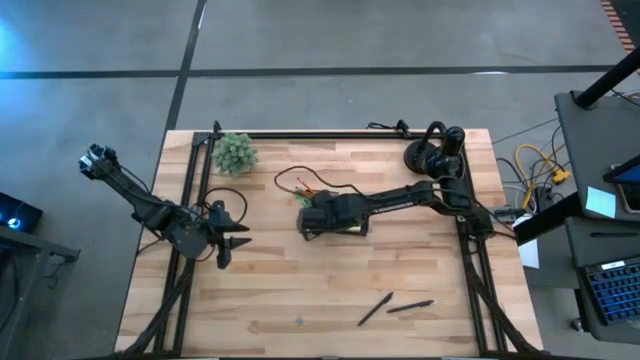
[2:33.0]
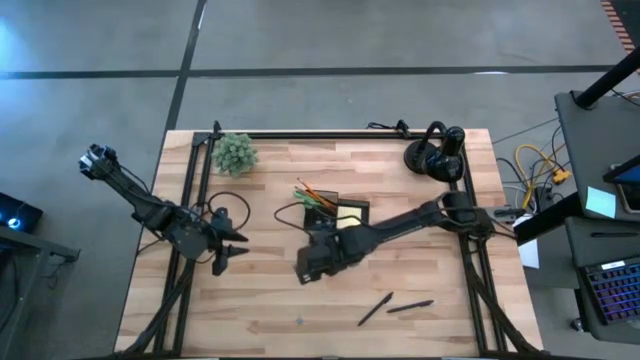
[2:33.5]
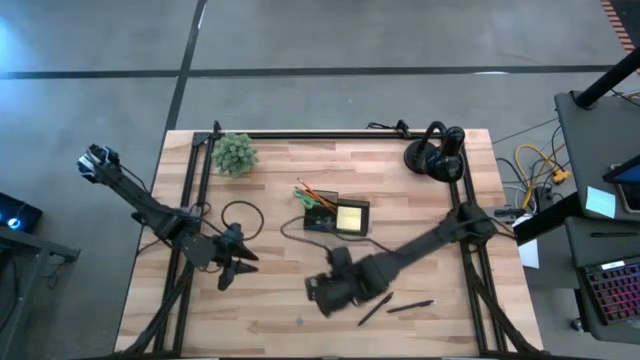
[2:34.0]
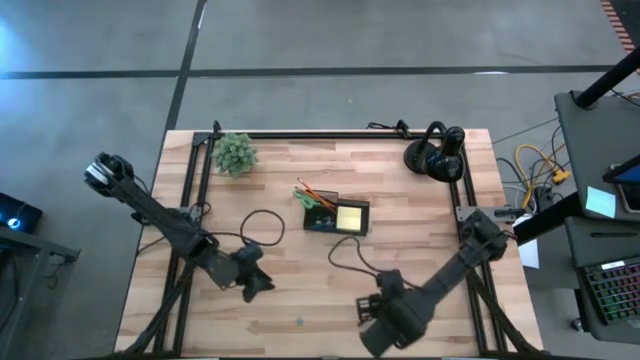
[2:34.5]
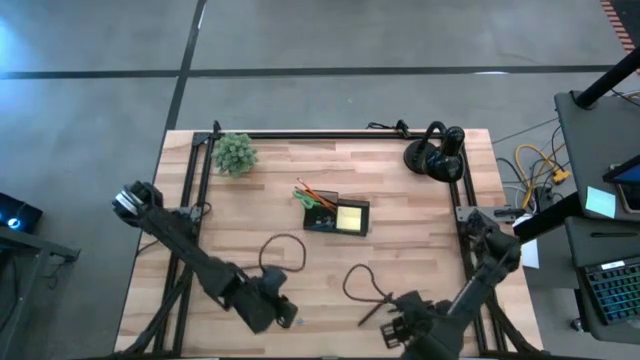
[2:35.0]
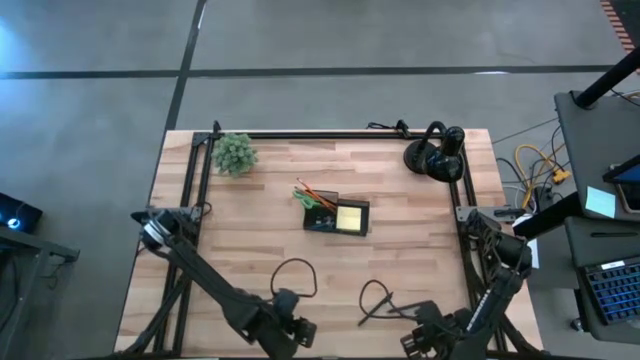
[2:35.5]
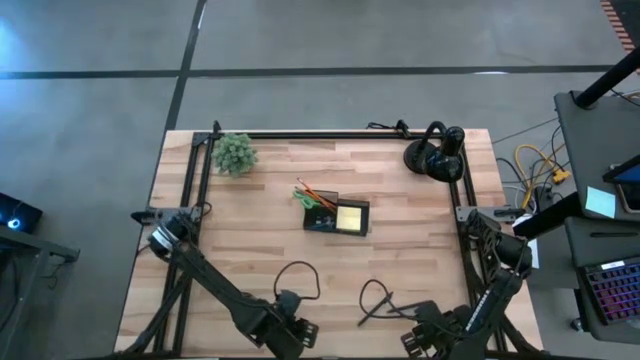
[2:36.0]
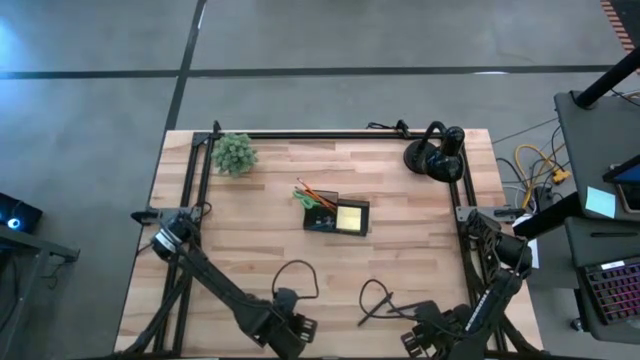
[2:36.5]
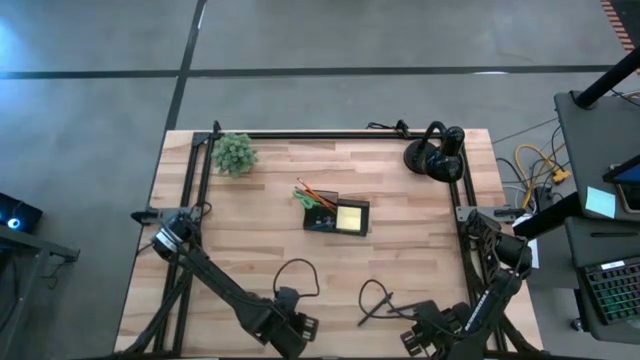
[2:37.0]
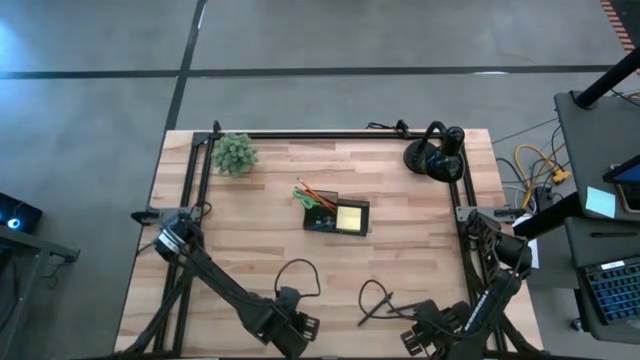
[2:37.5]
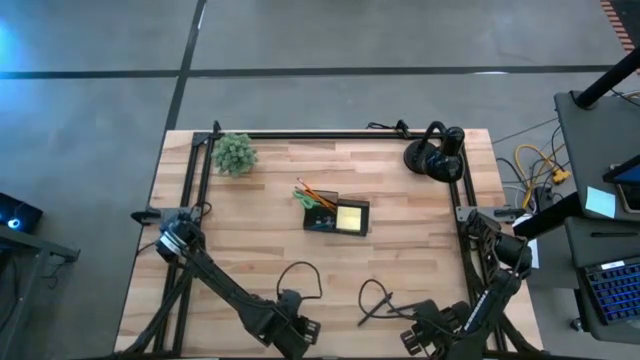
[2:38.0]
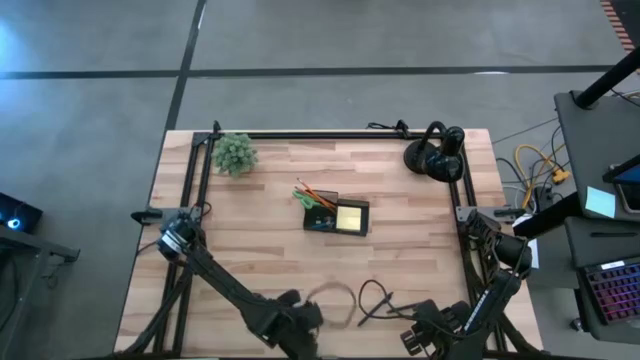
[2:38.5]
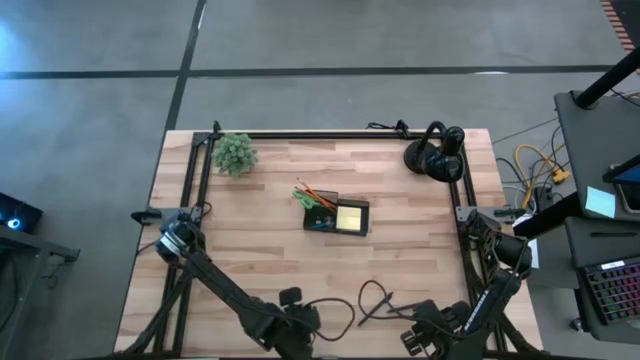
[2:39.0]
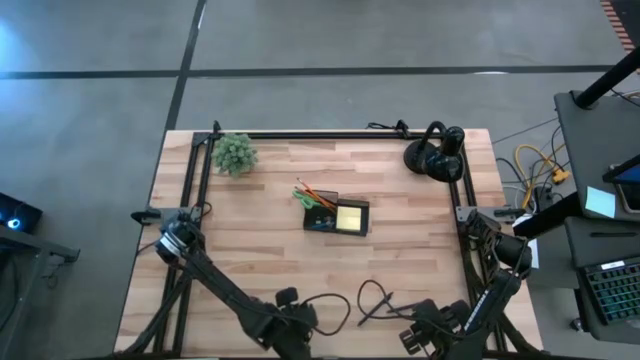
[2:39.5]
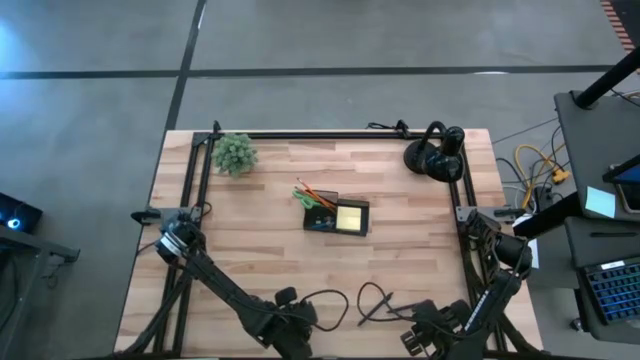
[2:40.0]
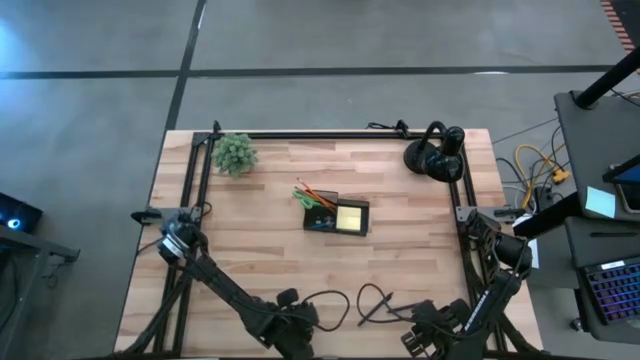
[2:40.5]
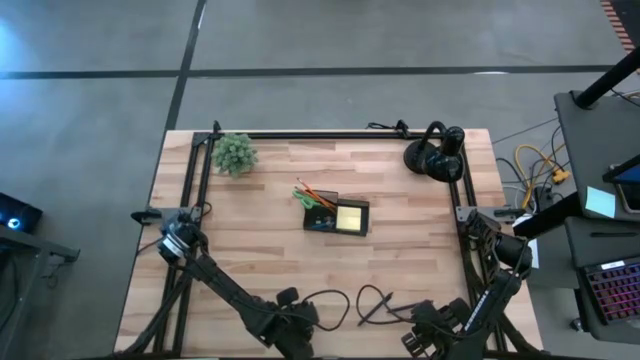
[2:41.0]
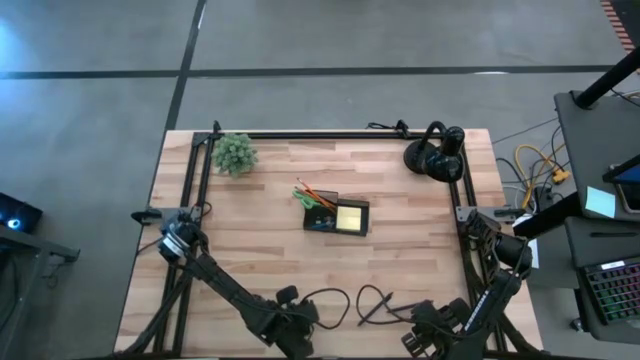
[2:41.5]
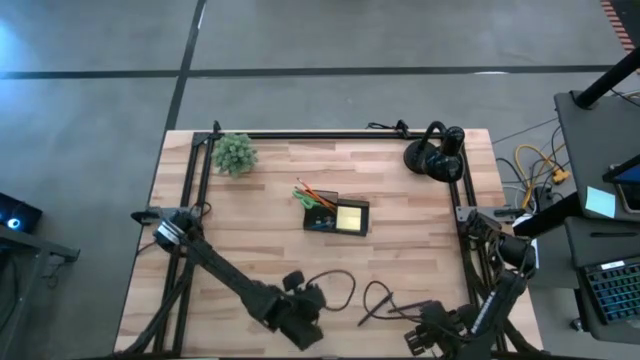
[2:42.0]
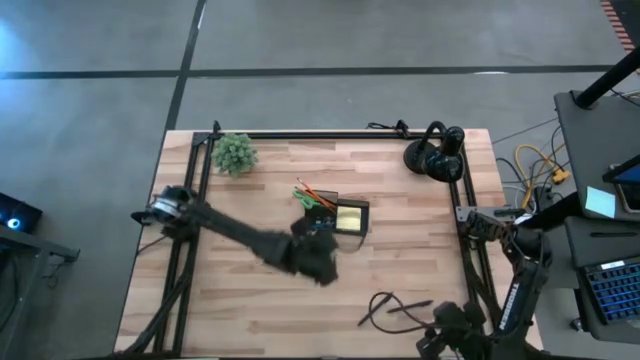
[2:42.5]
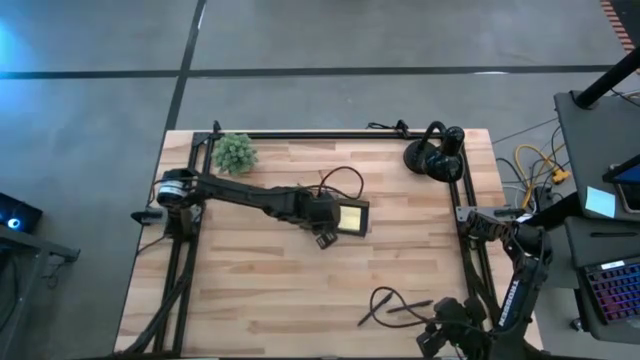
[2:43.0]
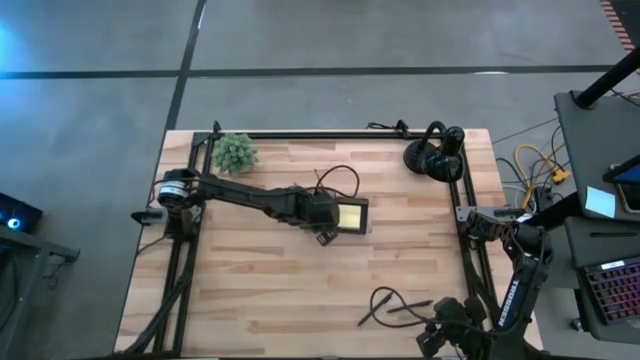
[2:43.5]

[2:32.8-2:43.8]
Task: Pick and place office supplies into organizer
Put the blue binder clip into the black desk organizer

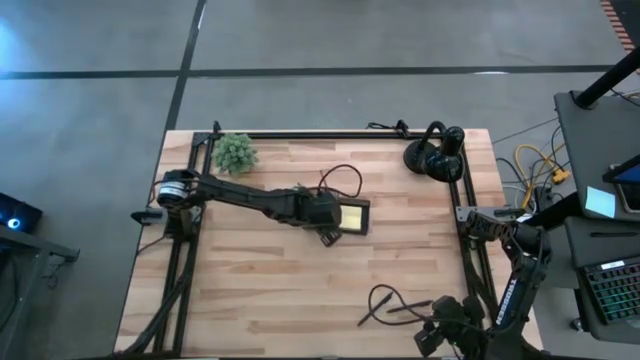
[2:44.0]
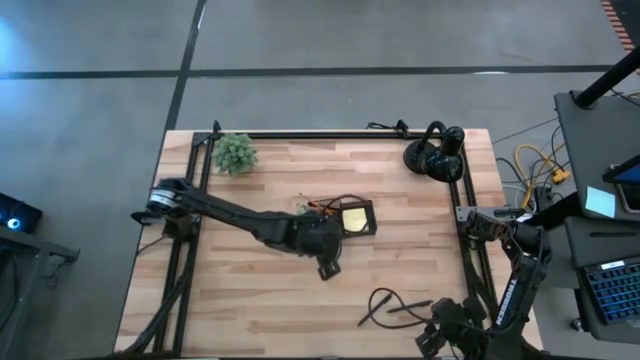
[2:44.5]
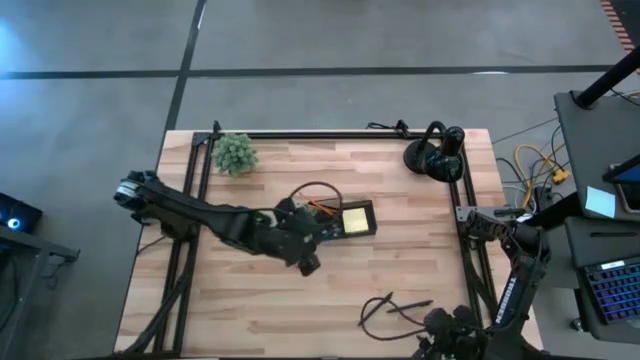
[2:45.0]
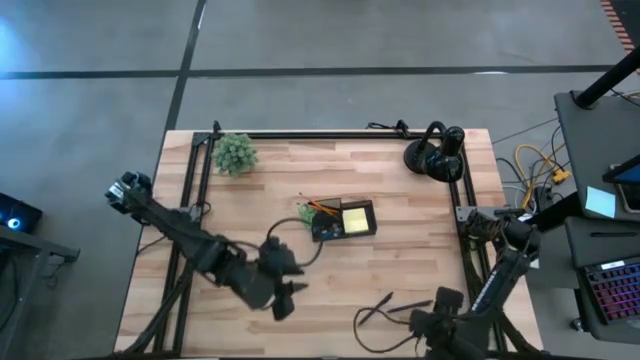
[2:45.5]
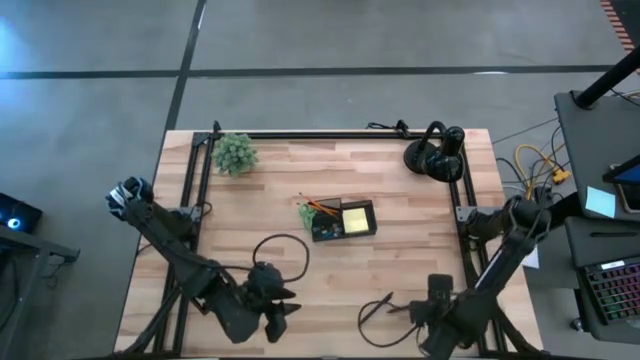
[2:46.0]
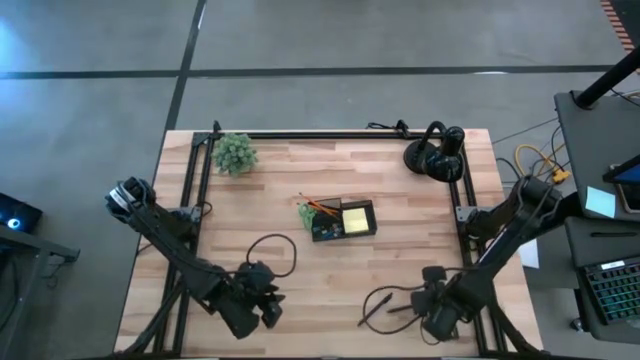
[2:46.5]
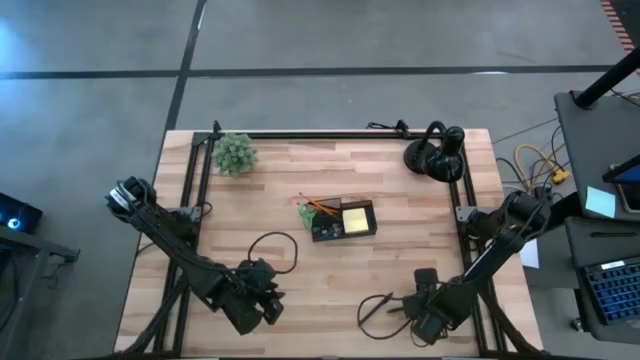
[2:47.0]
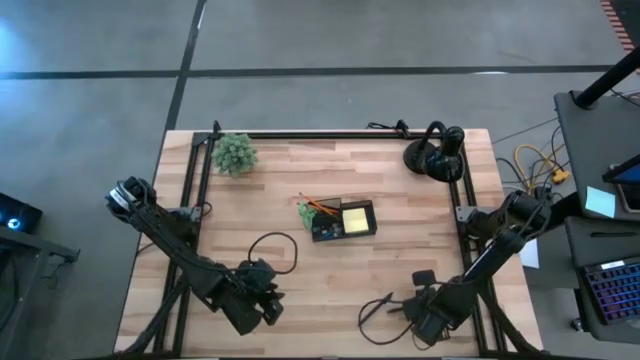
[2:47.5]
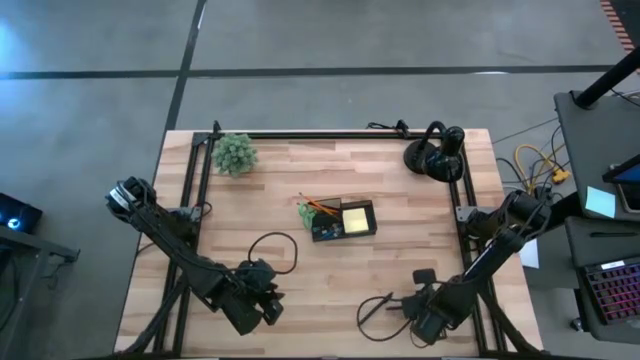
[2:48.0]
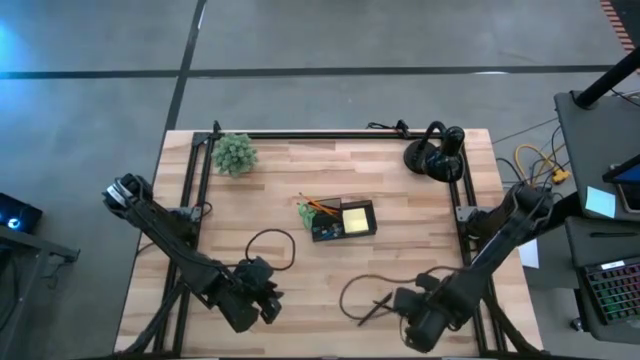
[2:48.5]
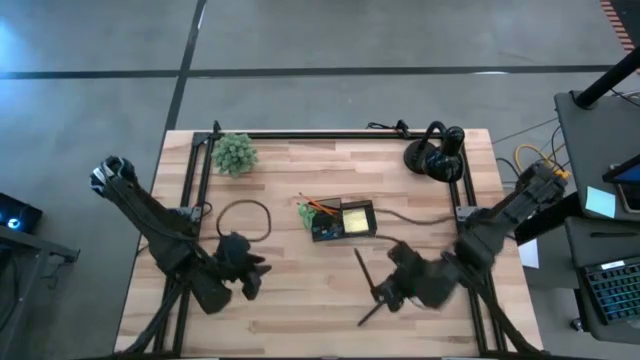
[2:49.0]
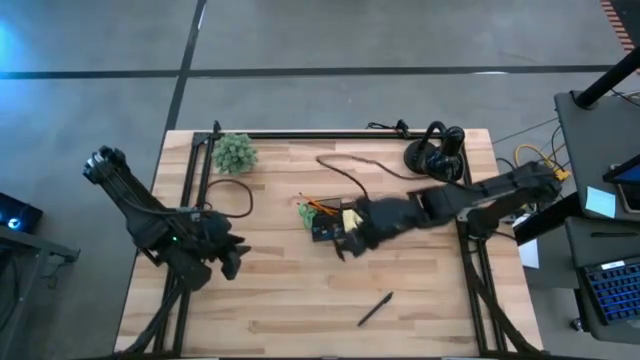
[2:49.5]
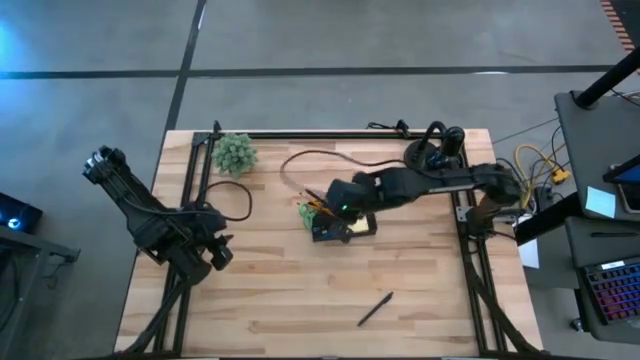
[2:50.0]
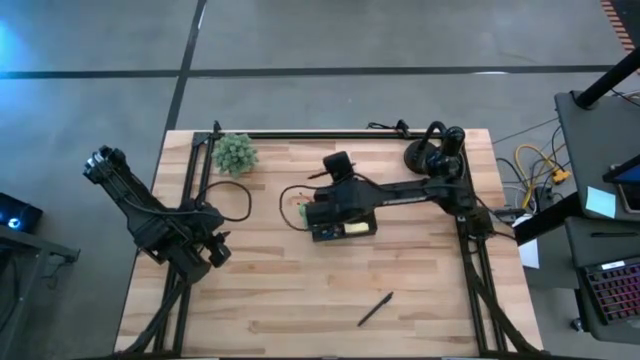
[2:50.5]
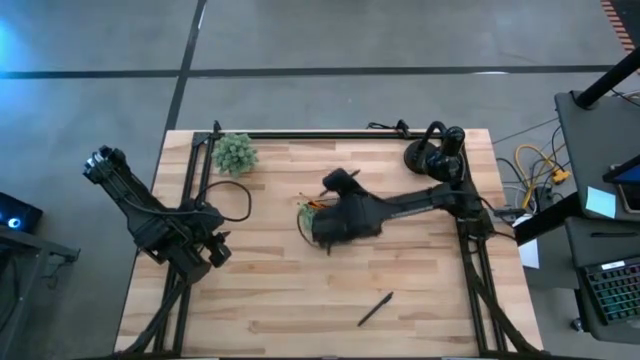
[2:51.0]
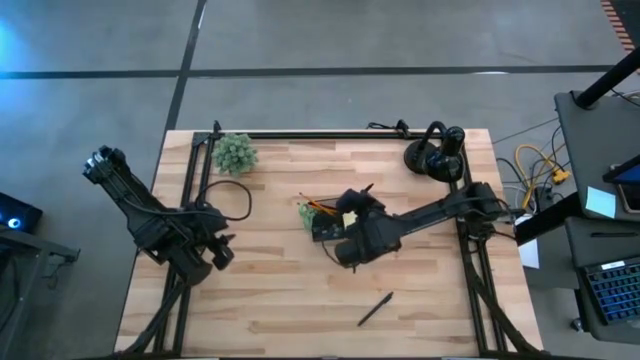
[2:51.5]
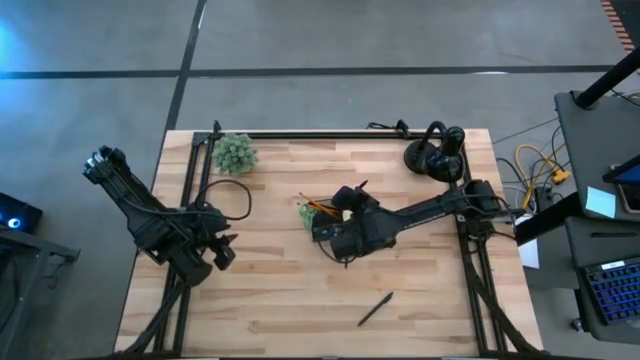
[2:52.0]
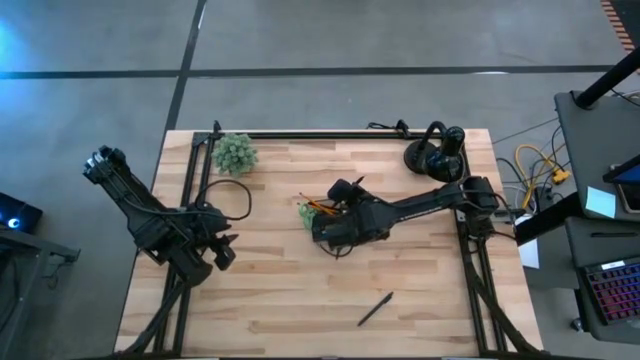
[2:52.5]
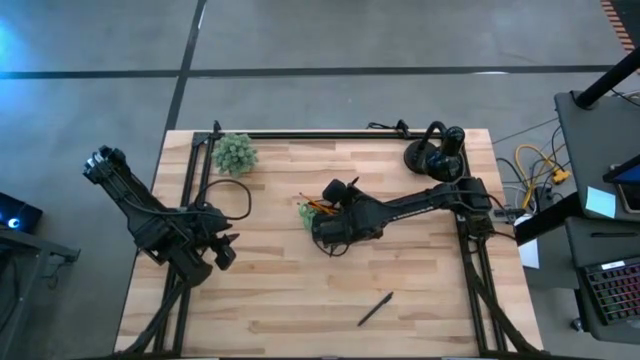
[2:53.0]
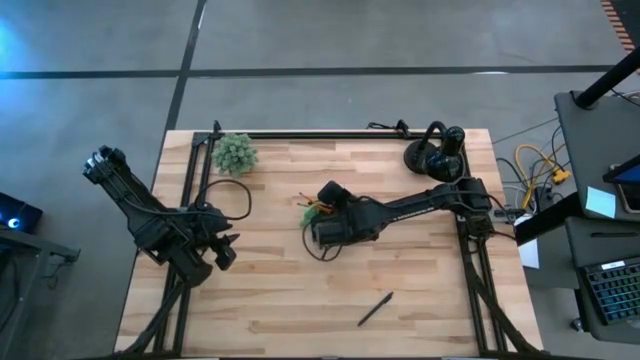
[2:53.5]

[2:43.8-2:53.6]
Put the right black pen into the black desk organizer

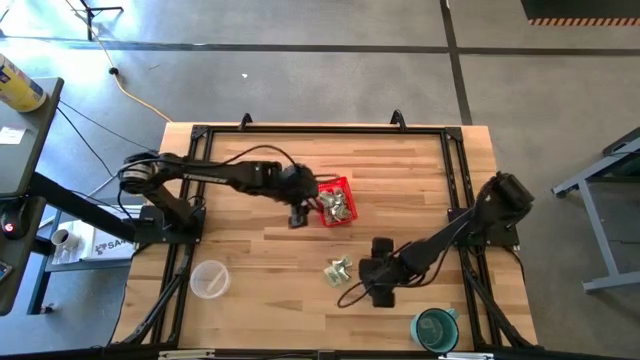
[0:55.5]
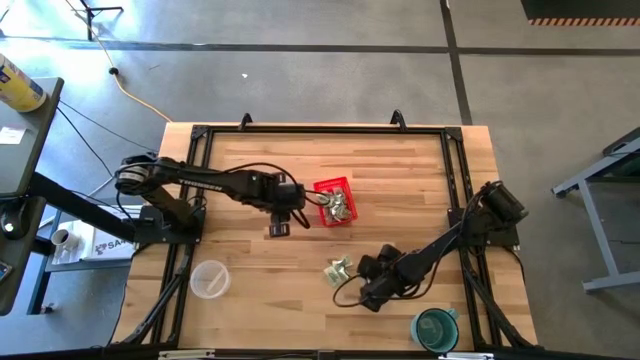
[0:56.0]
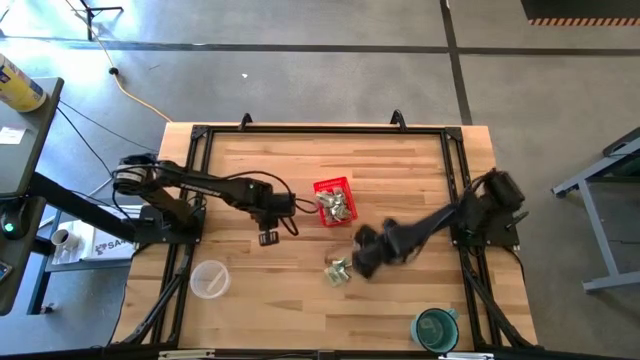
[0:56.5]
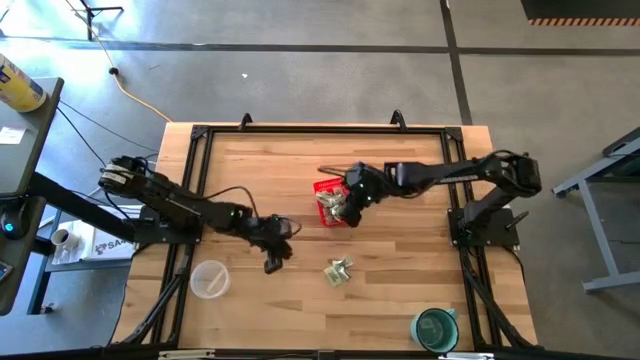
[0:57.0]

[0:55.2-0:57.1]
Task: Pick and place items into bin
Put the light green stevia packet into the red bin

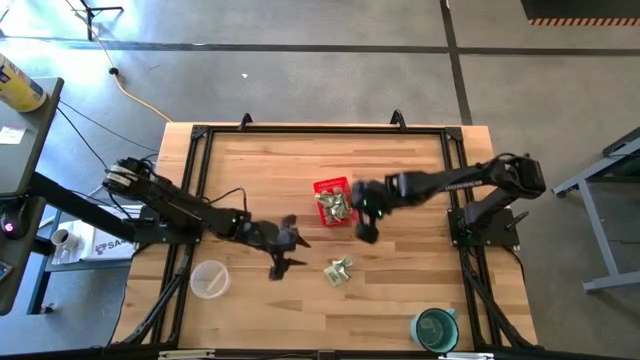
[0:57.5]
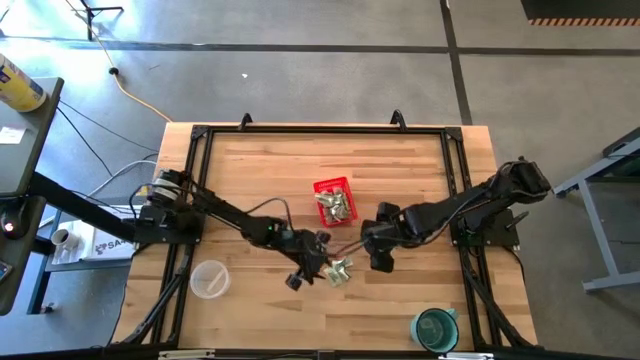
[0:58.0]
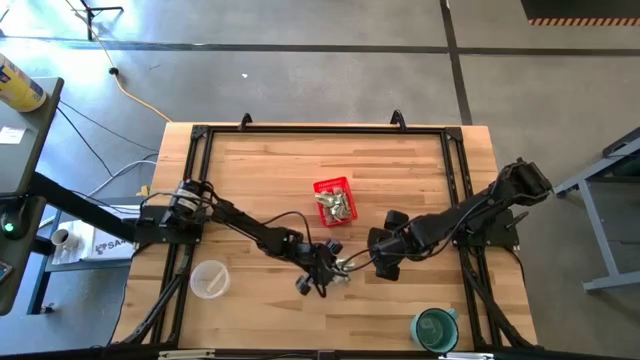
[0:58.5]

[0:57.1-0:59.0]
Put the light green stevia packet into the red bin
